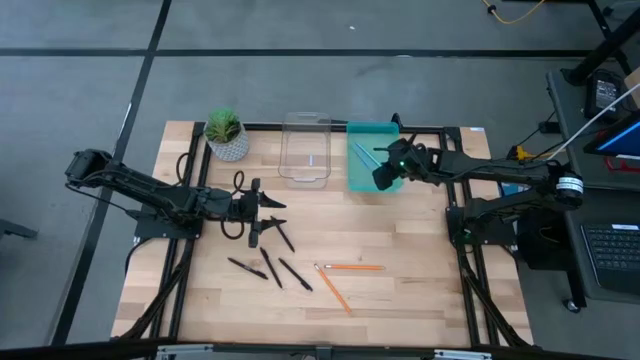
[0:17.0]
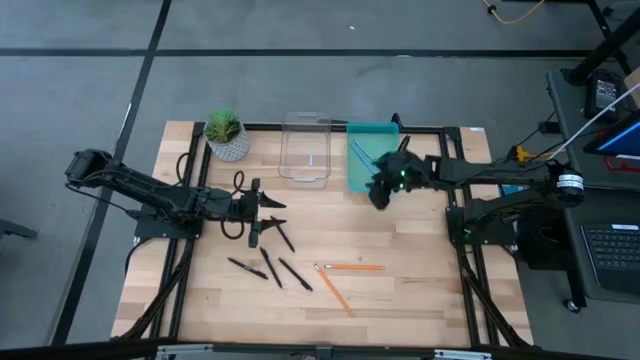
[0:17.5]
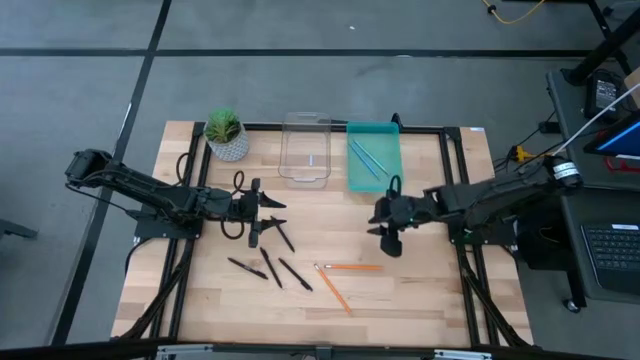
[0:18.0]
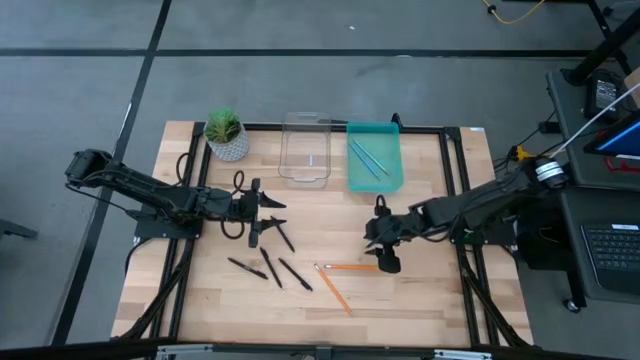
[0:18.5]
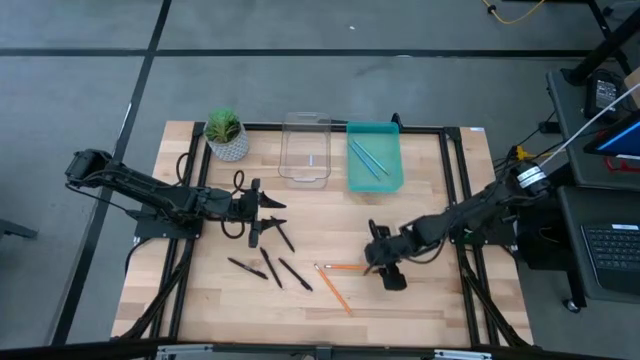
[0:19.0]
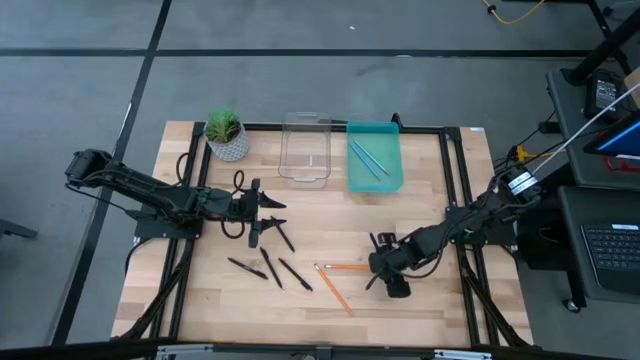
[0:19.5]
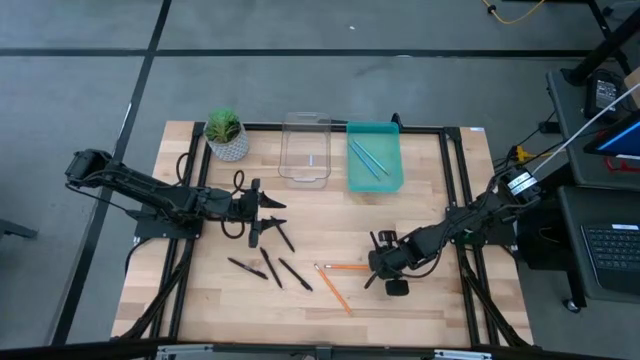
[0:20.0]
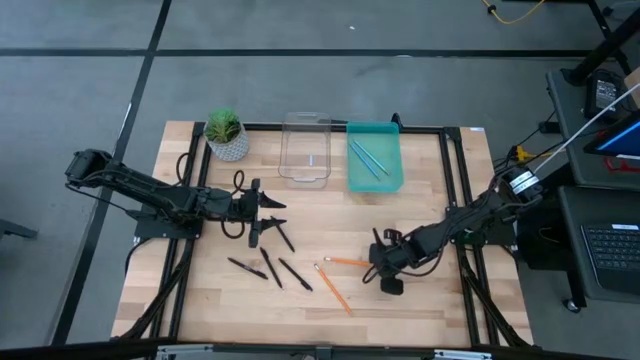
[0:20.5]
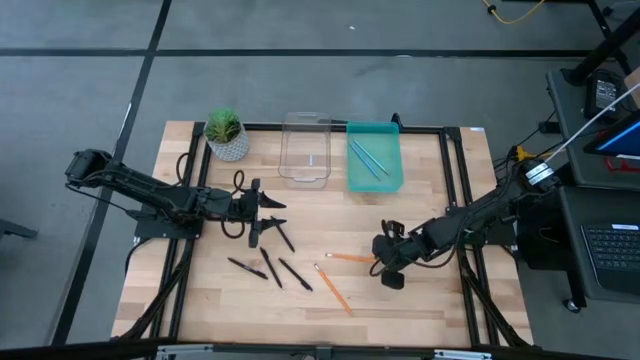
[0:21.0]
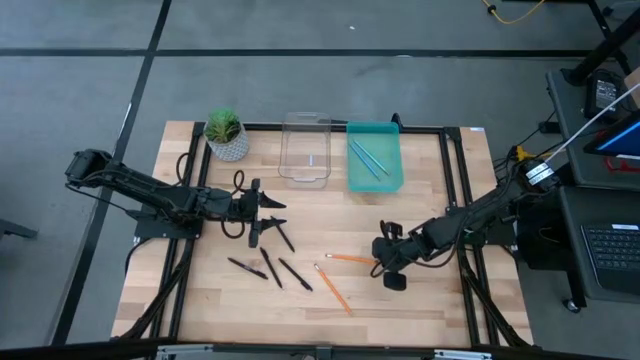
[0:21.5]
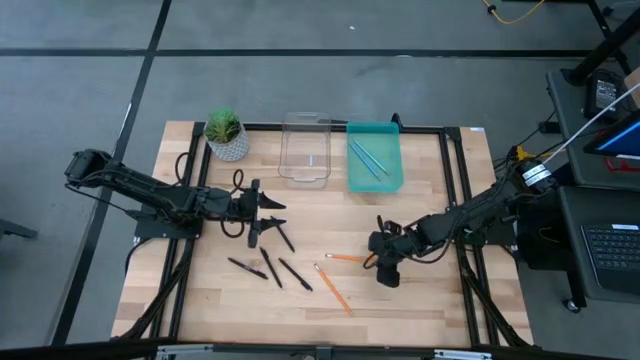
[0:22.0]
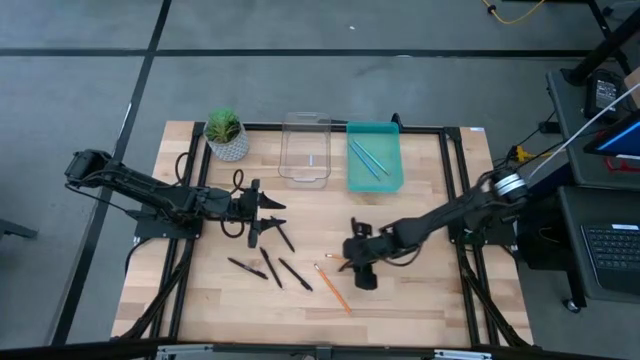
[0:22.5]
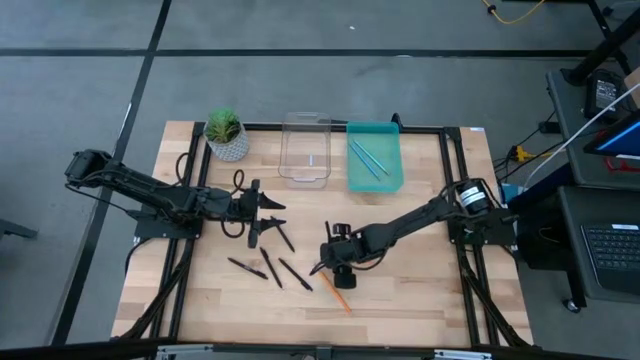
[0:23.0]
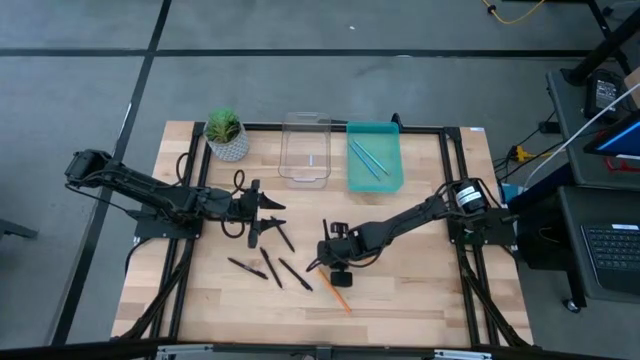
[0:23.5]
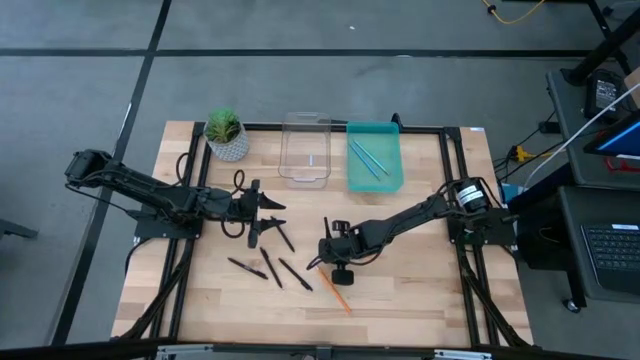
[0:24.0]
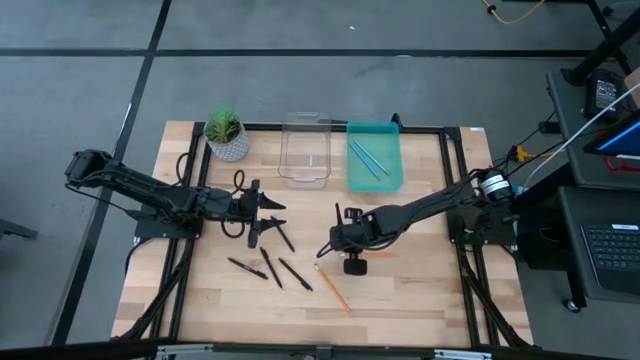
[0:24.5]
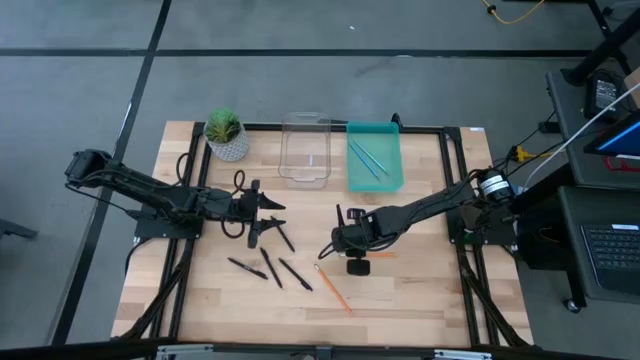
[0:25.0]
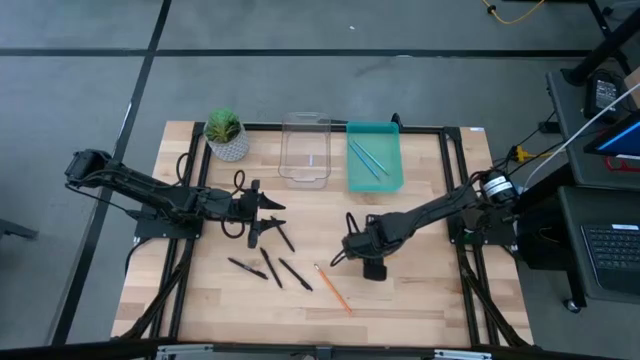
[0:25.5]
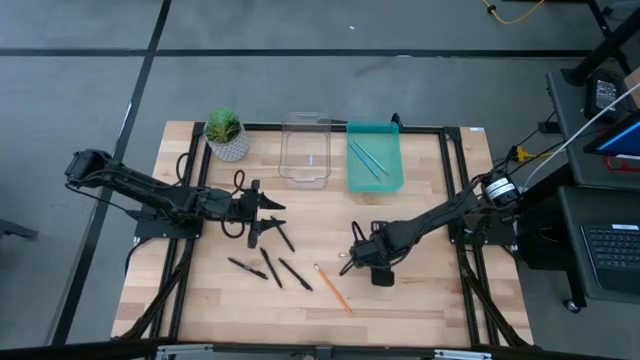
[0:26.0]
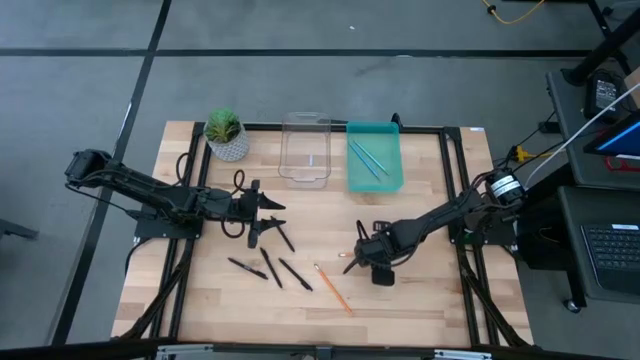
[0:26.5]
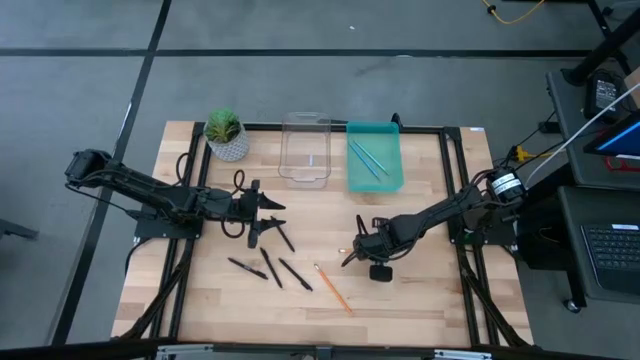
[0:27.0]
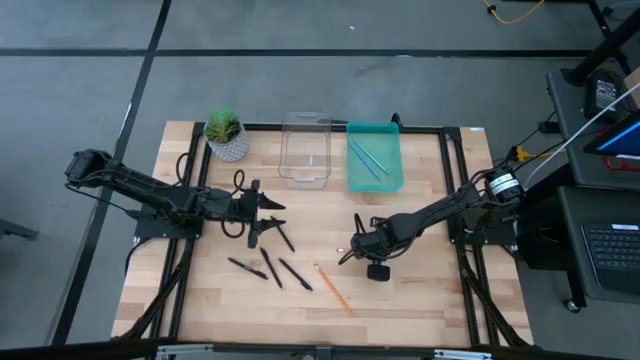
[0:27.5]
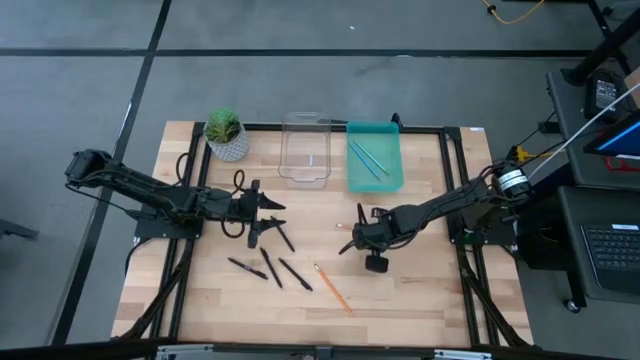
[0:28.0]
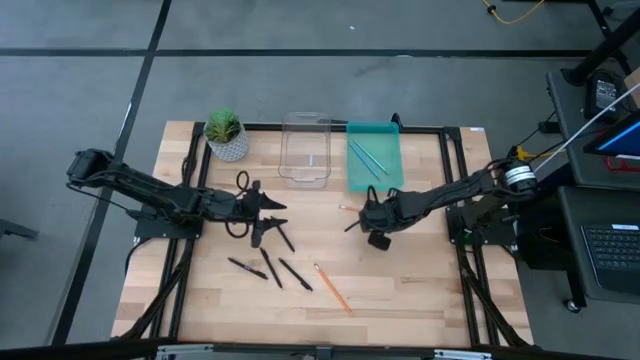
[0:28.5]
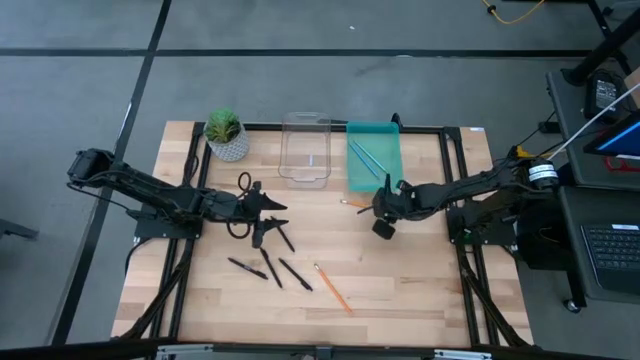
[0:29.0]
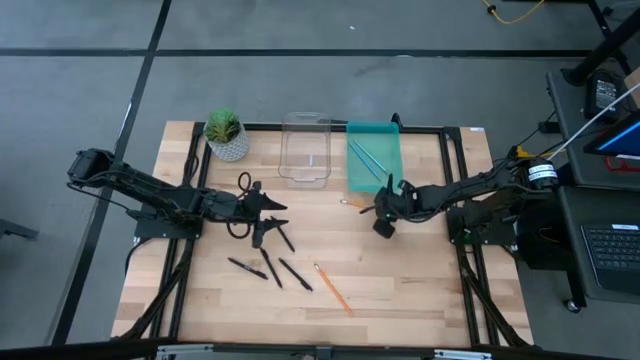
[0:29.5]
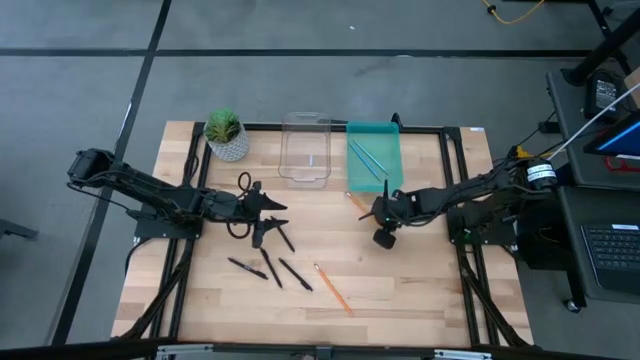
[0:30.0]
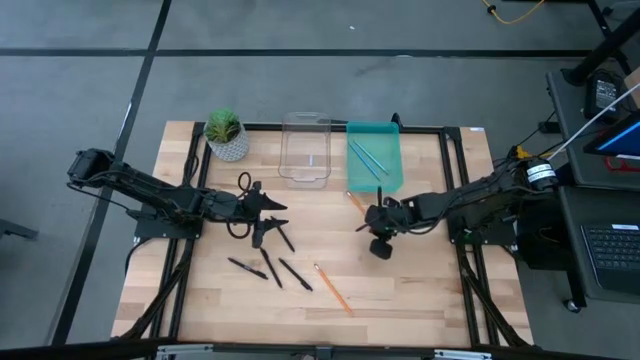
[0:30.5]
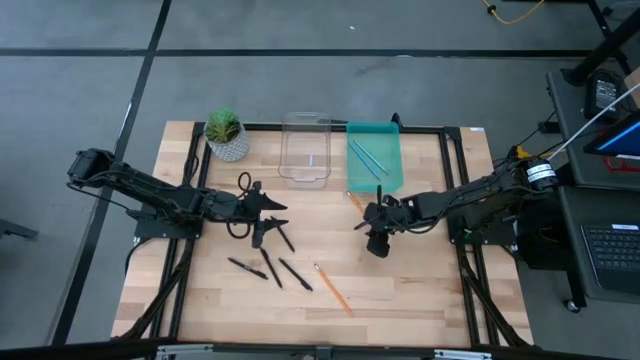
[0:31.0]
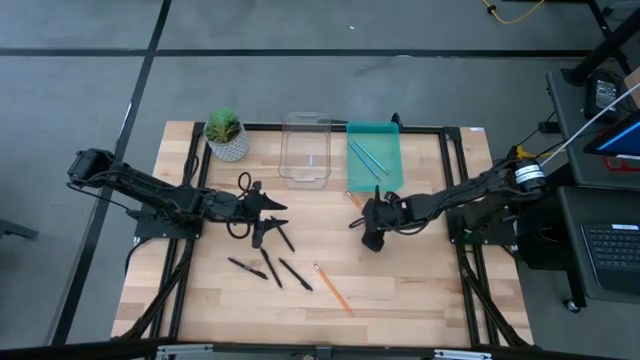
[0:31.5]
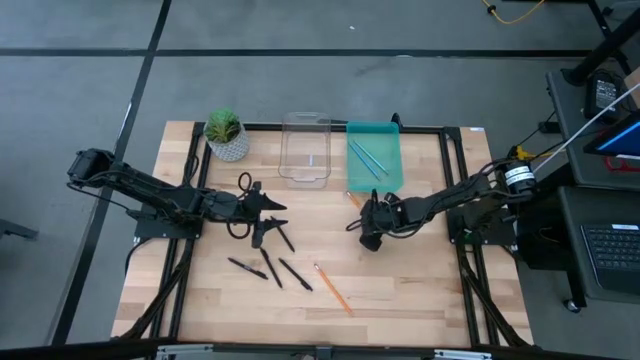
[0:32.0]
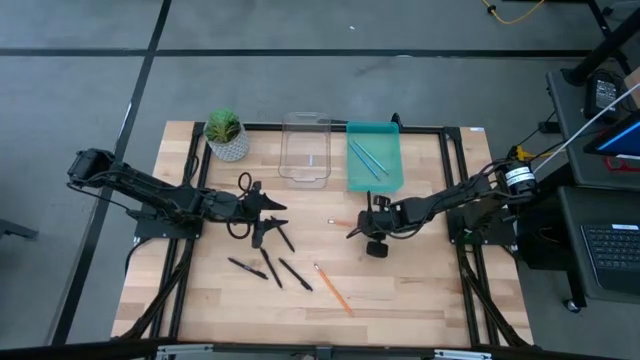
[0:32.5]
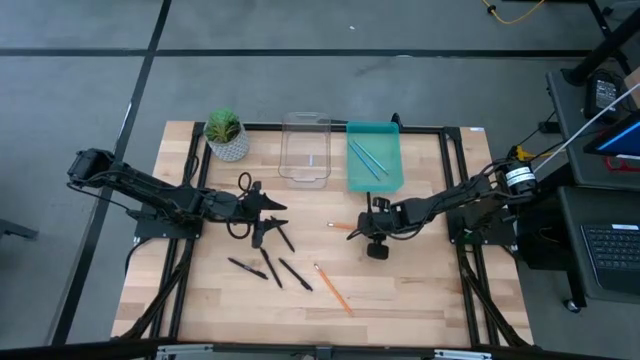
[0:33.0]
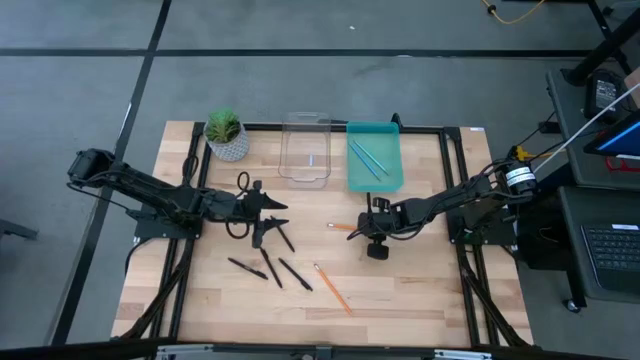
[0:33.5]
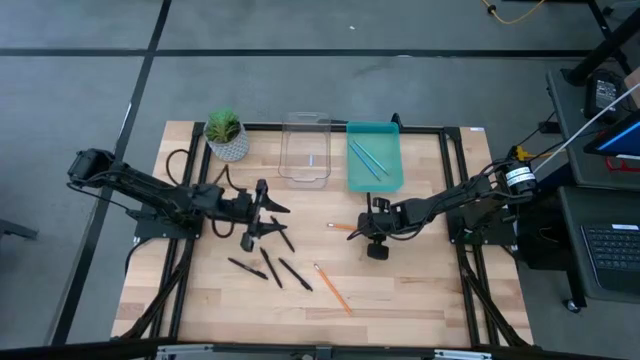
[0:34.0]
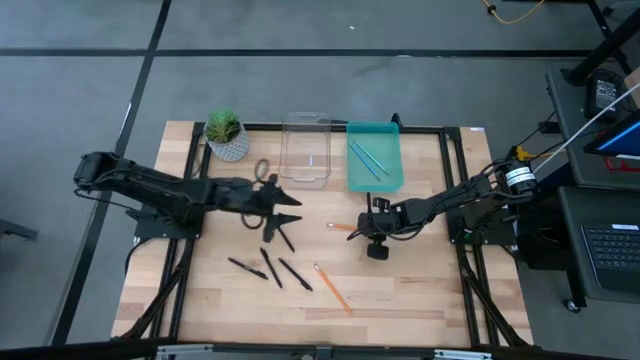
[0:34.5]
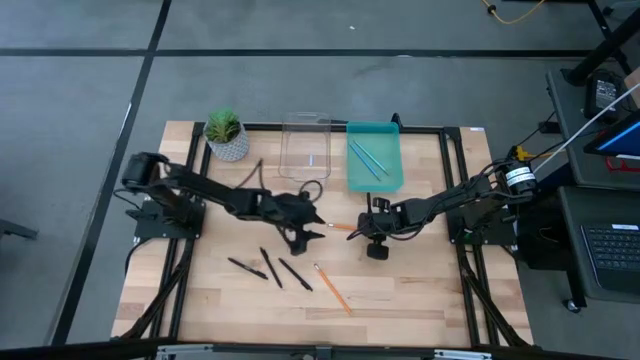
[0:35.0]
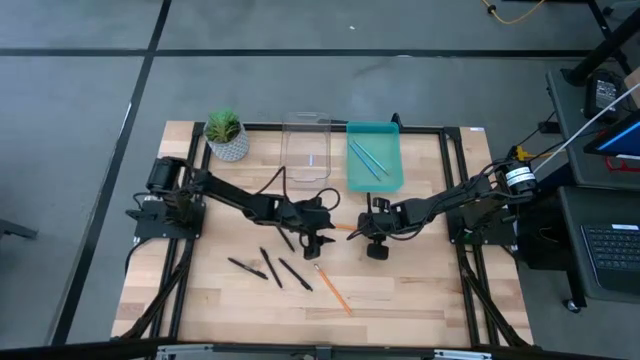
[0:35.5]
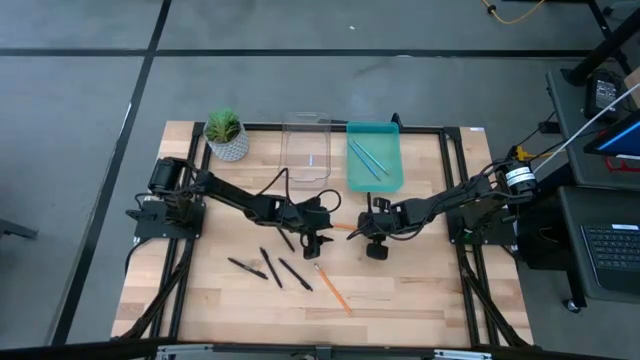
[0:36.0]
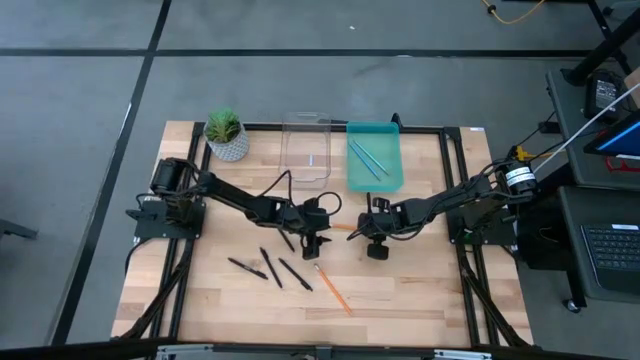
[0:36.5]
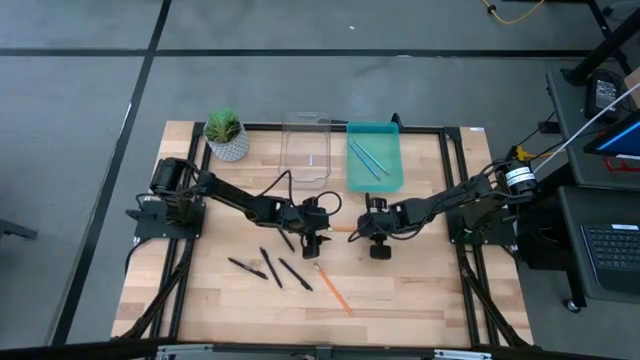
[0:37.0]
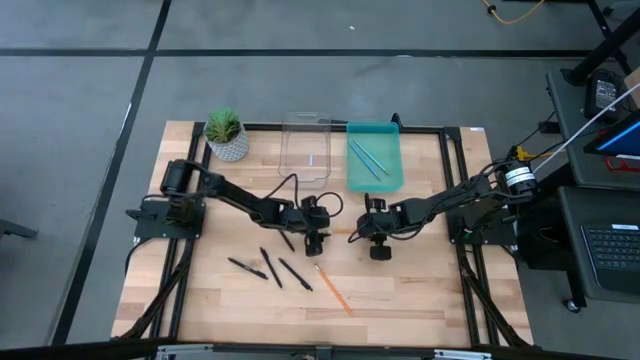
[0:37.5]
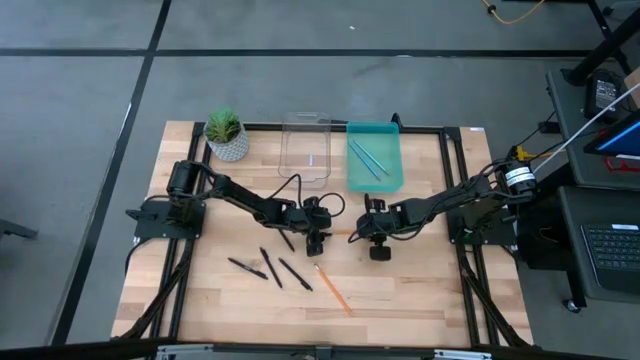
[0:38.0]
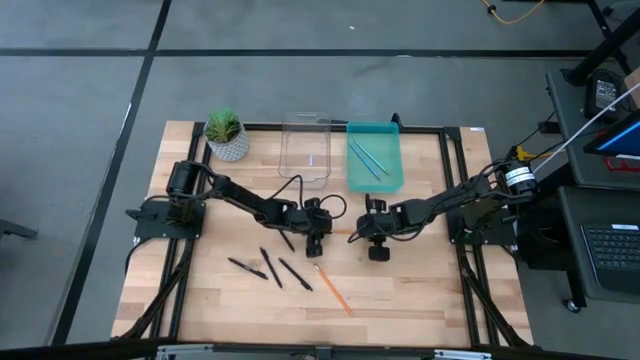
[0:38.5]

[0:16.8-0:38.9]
Task: Sort pens & pencils
Put the orange pencil into the blue bin
